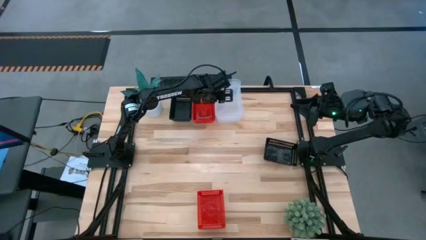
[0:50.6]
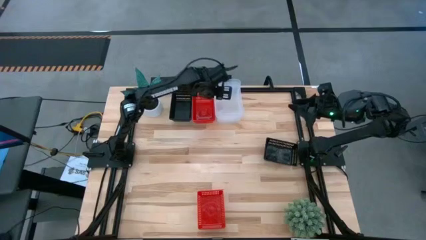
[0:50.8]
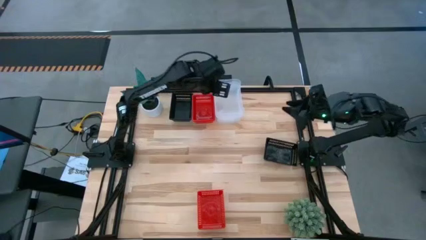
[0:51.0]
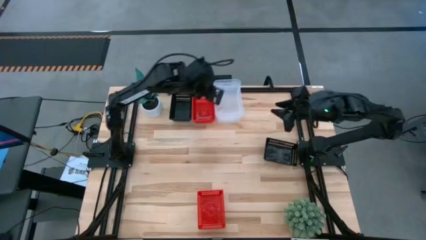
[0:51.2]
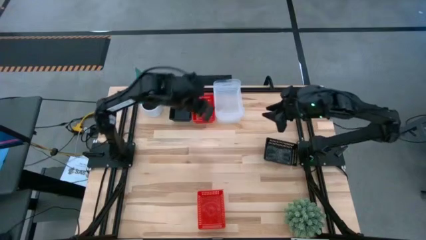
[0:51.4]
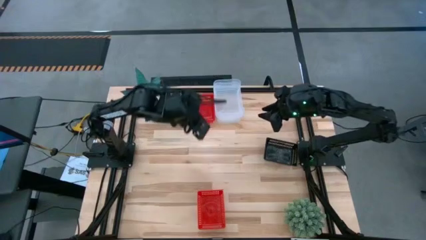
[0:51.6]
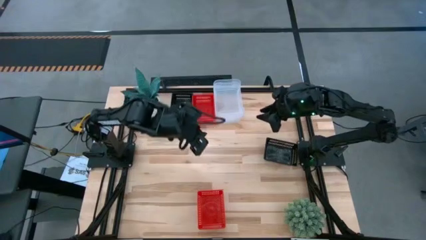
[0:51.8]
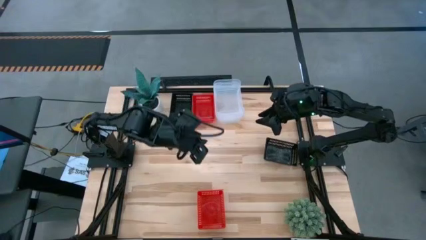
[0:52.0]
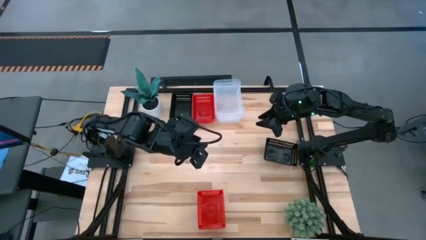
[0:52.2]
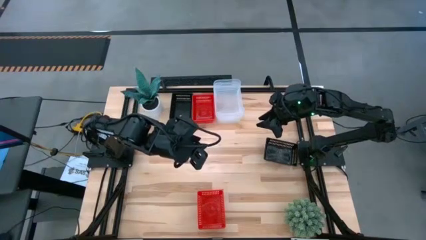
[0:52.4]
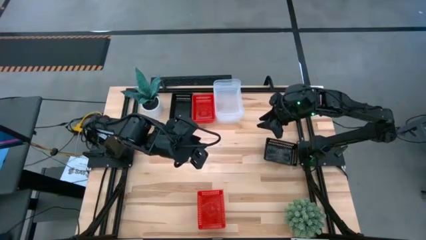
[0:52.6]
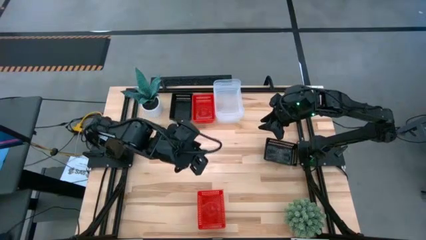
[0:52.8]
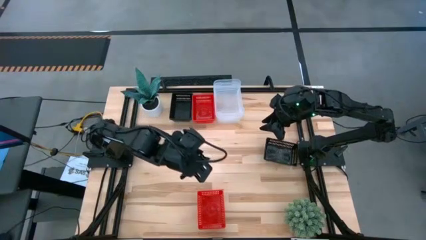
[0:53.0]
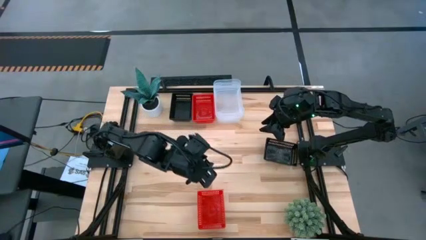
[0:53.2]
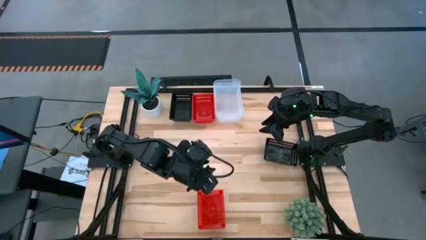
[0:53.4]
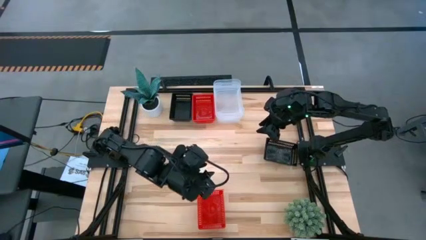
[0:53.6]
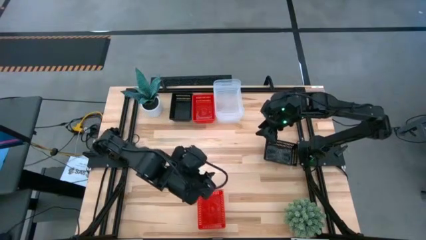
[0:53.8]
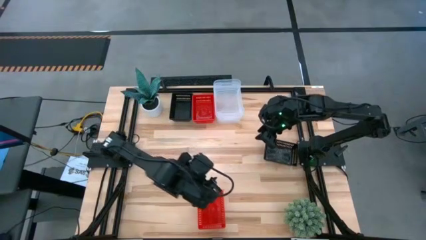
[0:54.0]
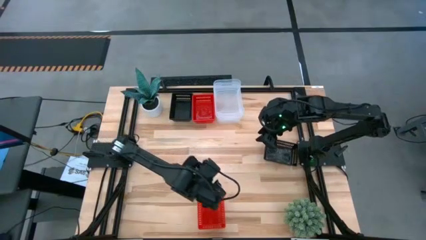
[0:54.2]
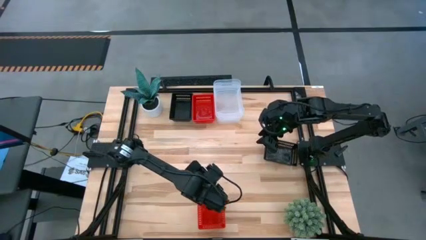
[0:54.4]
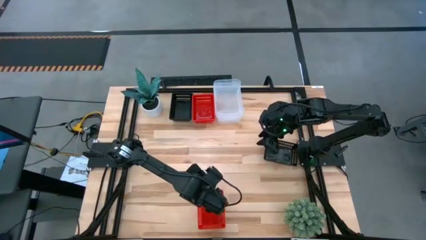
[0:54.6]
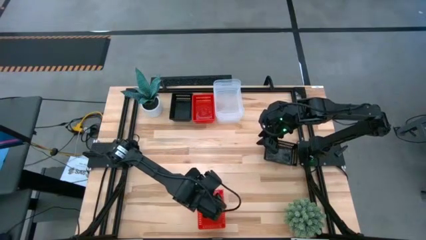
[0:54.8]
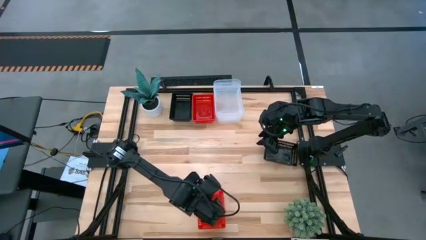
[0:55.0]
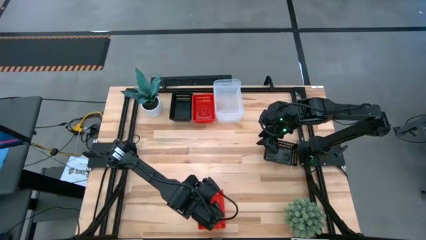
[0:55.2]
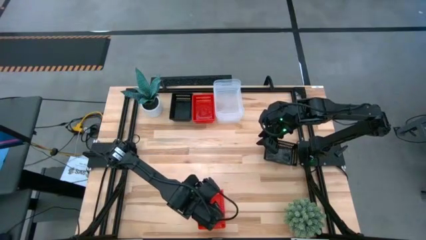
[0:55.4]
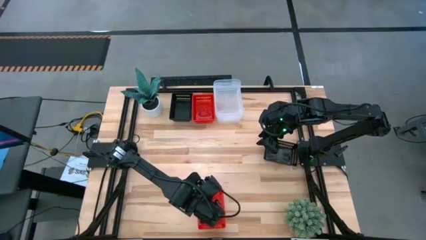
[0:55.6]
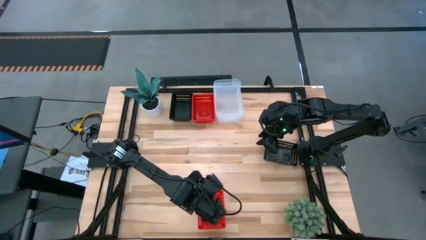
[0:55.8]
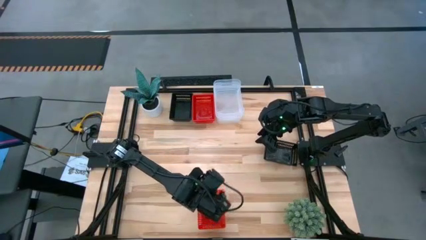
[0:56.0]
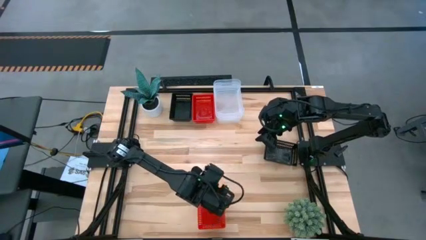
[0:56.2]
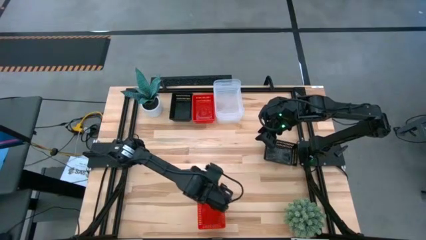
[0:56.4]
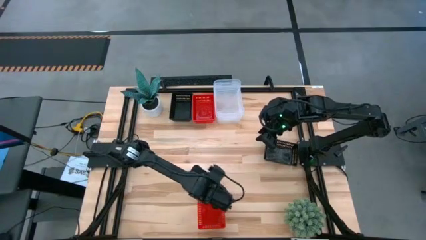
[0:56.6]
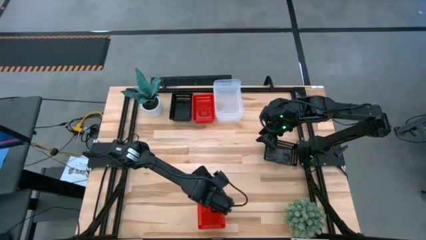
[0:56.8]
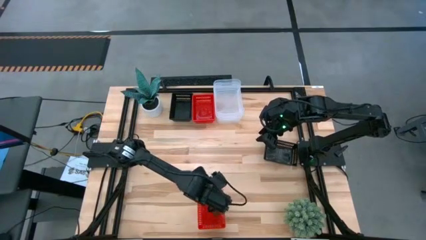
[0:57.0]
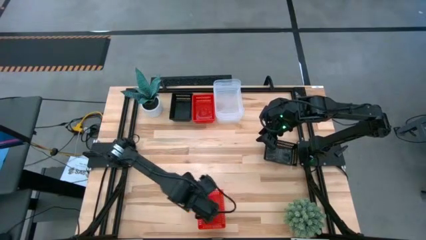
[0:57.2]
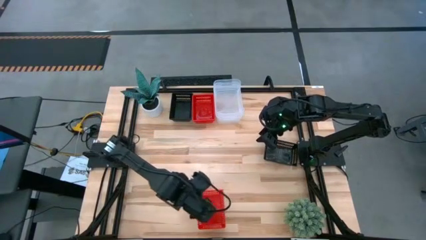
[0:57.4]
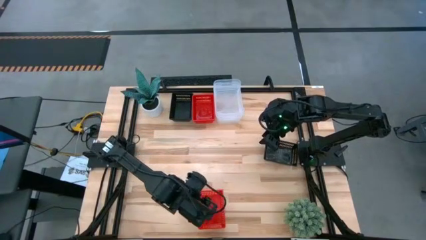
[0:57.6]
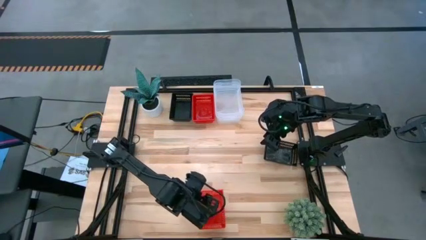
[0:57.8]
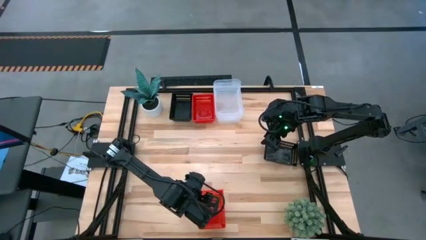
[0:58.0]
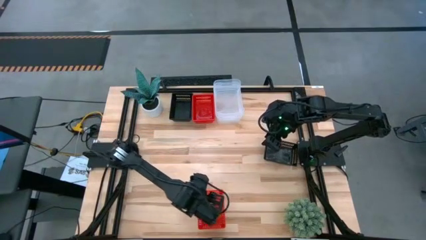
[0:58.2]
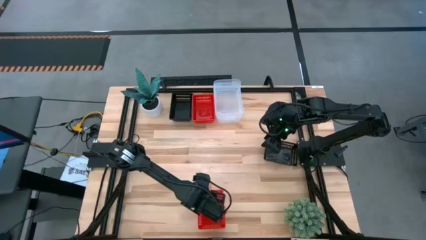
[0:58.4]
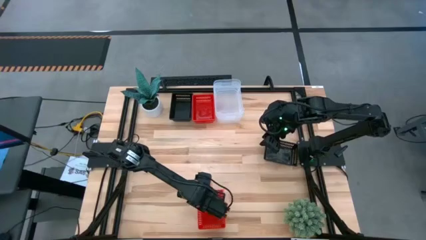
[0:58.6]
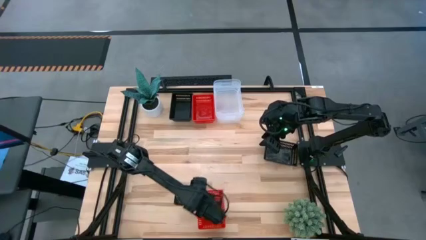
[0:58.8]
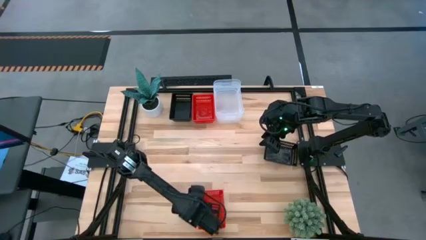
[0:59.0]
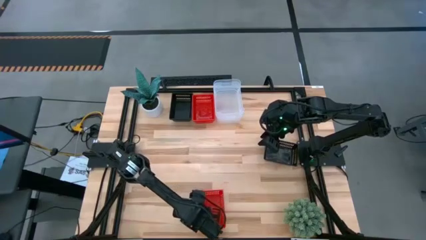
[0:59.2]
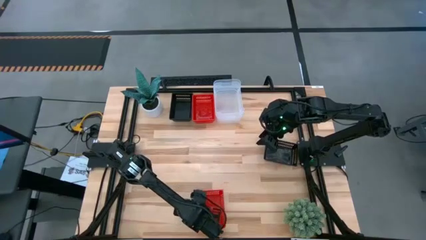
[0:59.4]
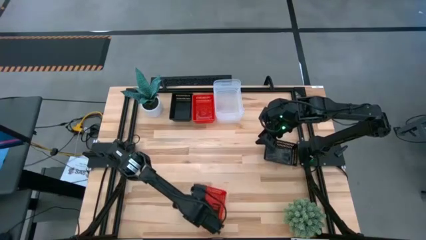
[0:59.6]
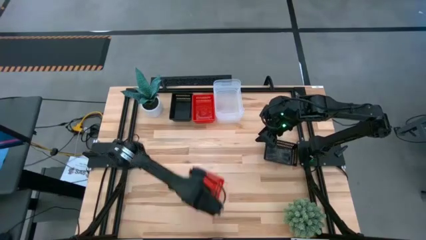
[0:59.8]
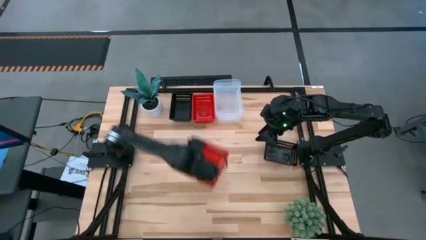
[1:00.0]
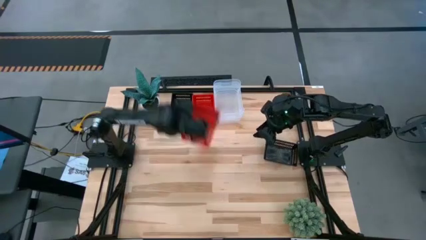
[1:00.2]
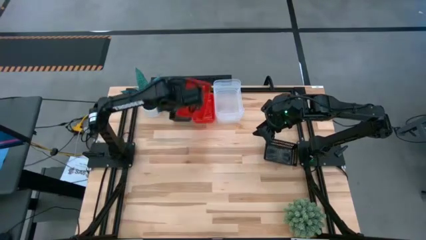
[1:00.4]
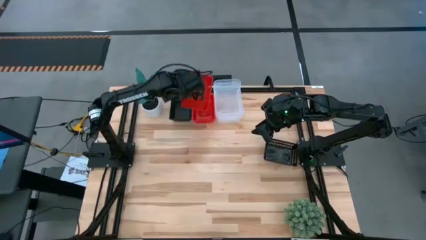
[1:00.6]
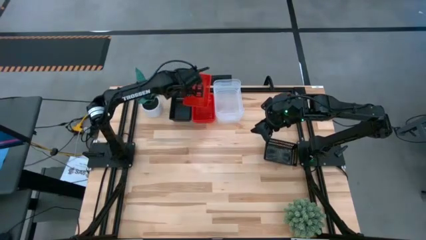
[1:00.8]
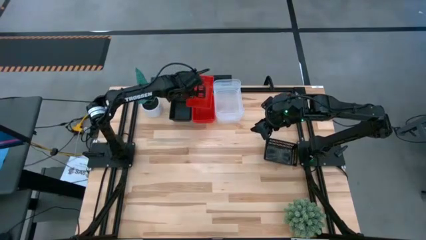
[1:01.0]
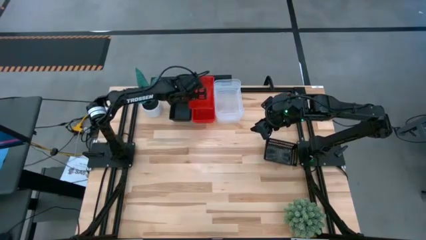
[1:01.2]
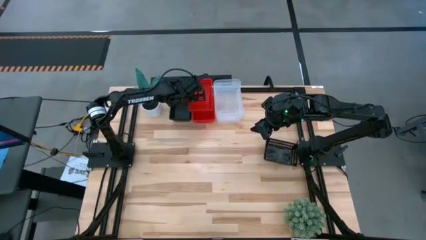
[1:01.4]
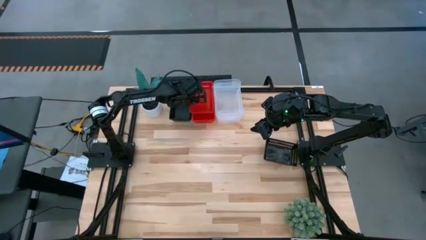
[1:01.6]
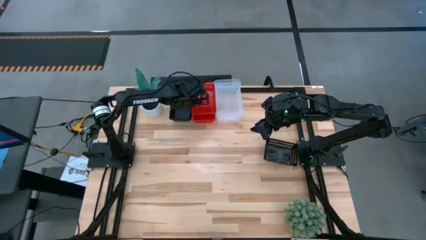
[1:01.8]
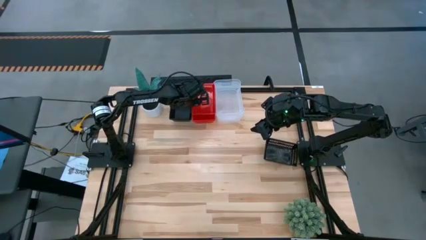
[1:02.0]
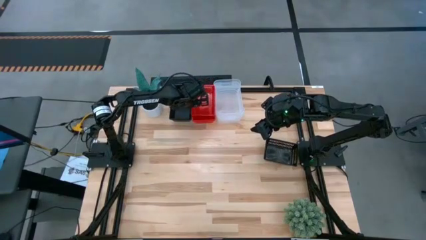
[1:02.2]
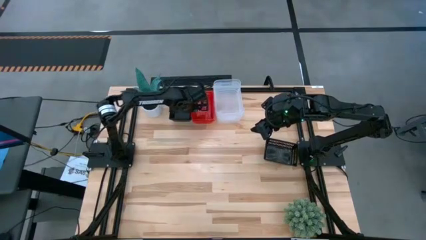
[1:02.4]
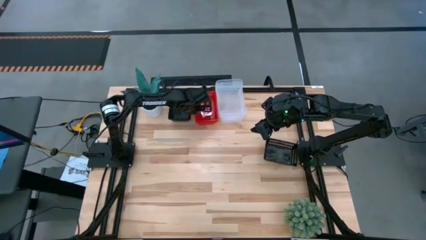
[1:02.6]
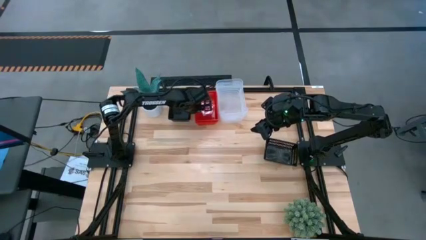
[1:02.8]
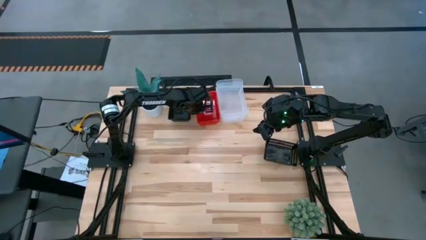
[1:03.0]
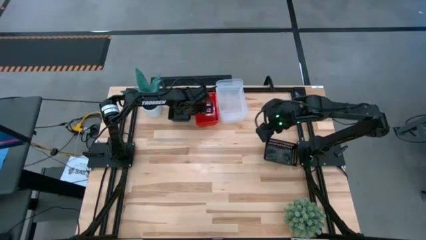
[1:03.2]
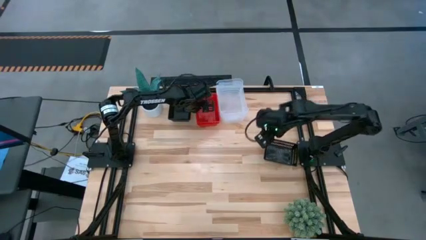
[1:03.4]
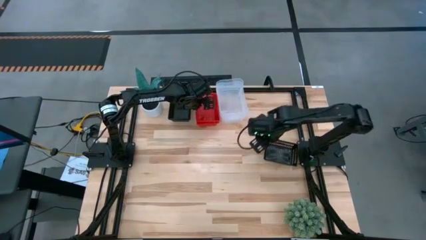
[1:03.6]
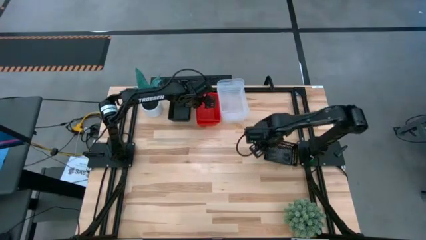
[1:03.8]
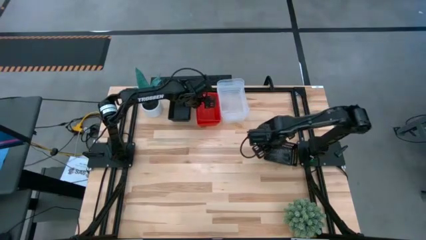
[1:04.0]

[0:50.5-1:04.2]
Stack the red bin on the top red bins

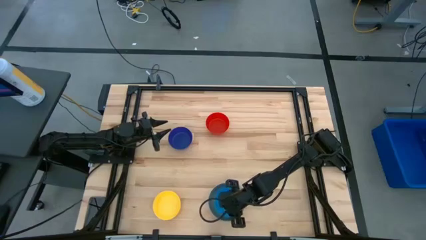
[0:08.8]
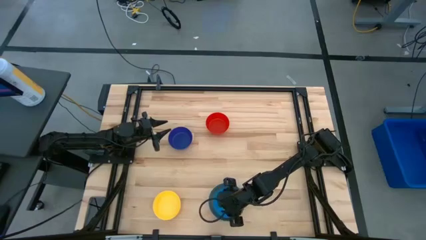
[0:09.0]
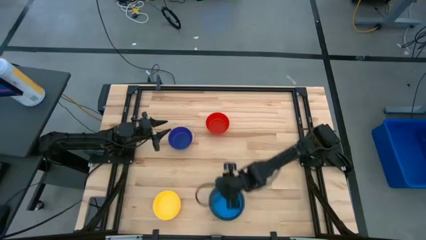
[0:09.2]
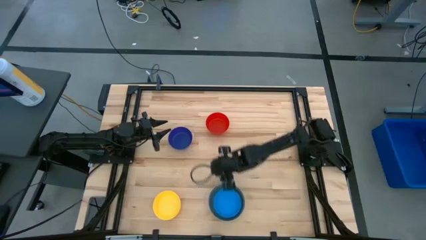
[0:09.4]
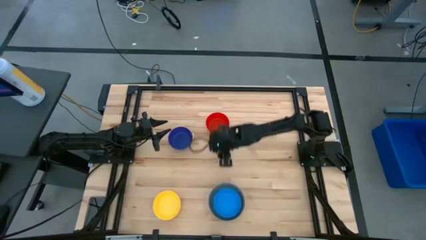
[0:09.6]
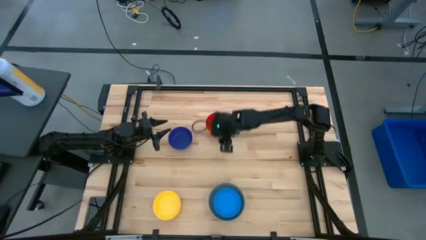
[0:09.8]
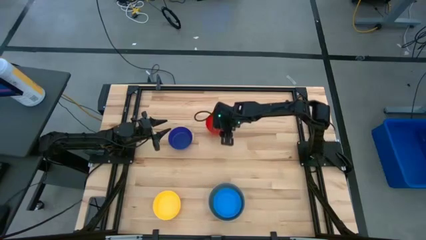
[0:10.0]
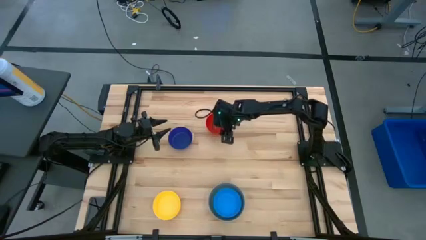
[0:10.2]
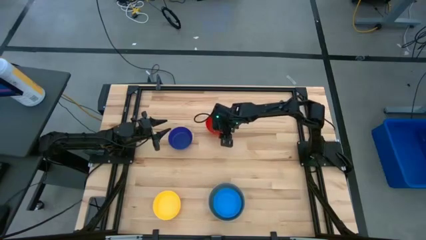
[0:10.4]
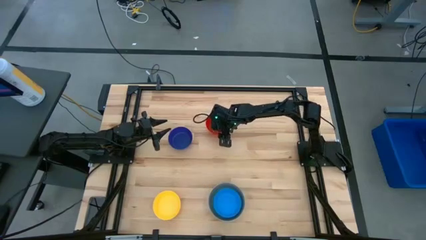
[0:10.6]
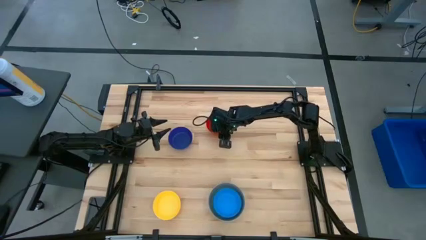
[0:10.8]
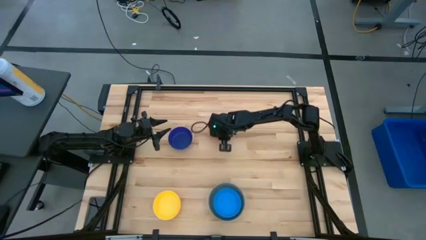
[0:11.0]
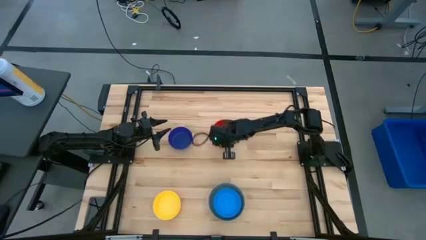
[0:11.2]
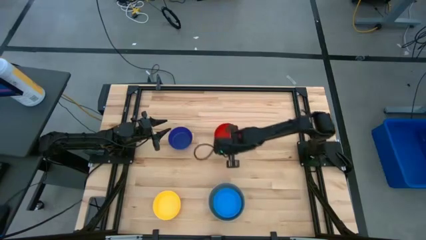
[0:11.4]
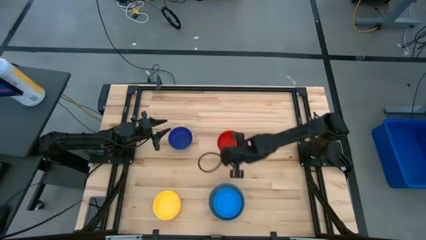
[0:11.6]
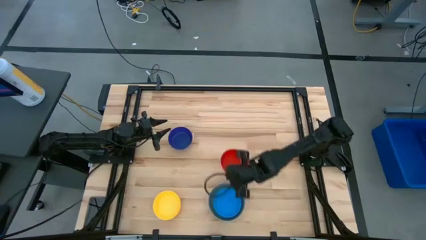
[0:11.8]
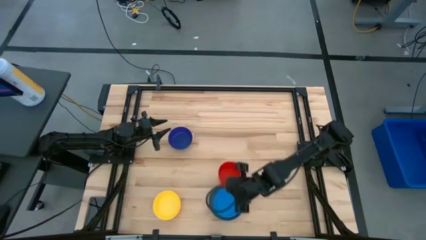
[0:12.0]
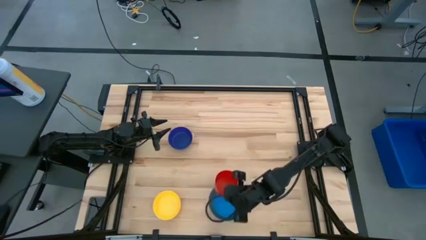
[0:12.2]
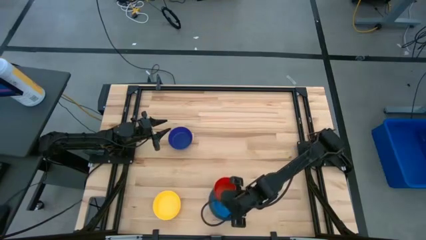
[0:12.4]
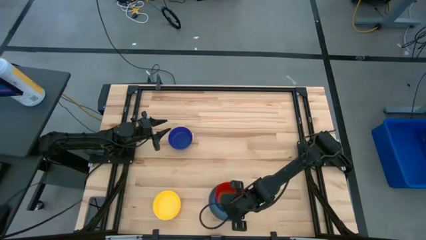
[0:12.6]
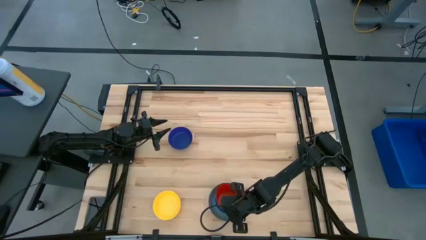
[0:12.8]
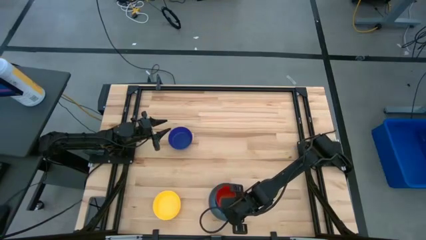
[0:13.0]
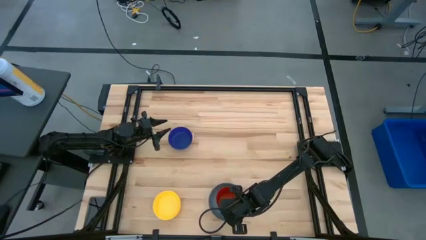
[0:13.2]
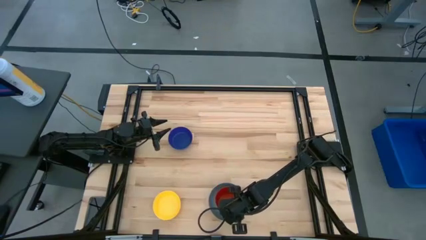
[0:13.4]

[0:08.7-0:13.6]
Stack the red bowl on top of the light blue bowl
